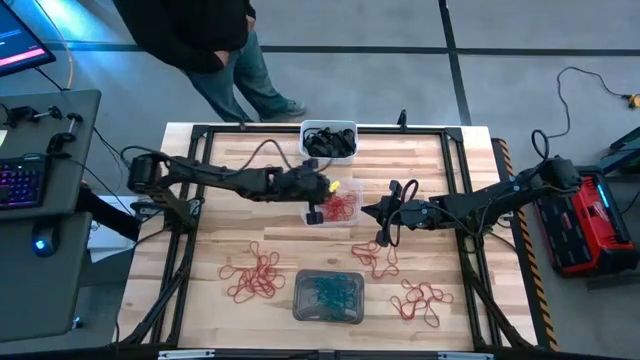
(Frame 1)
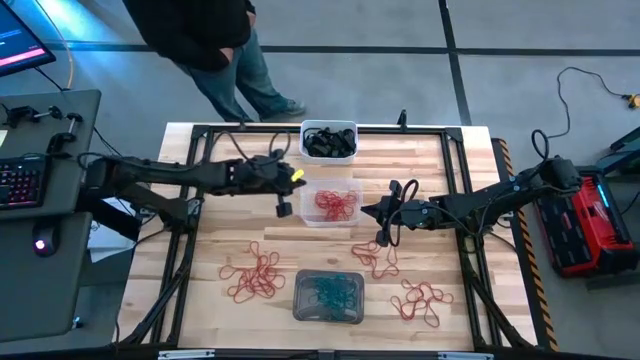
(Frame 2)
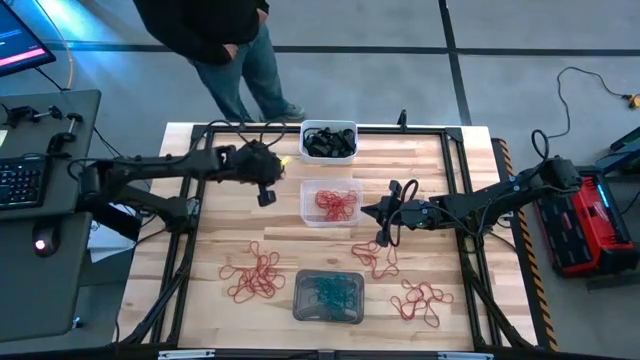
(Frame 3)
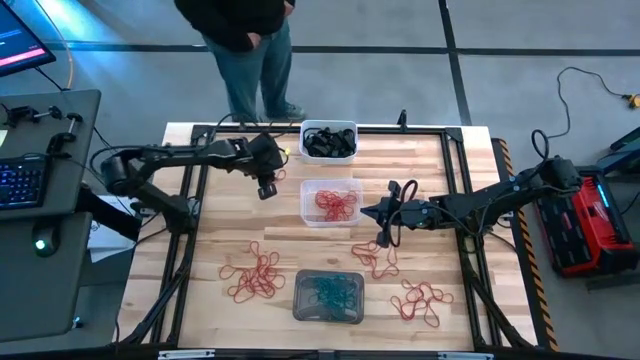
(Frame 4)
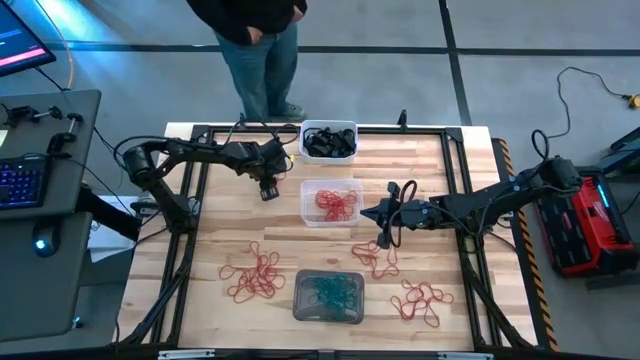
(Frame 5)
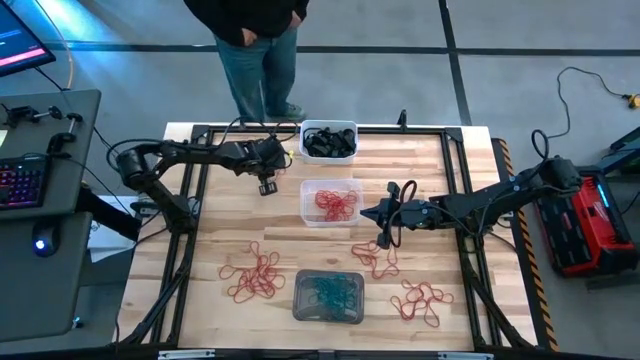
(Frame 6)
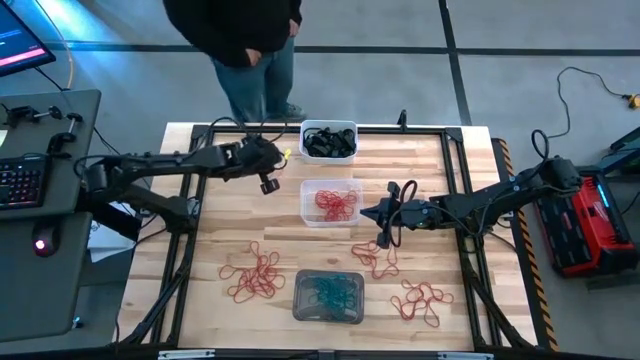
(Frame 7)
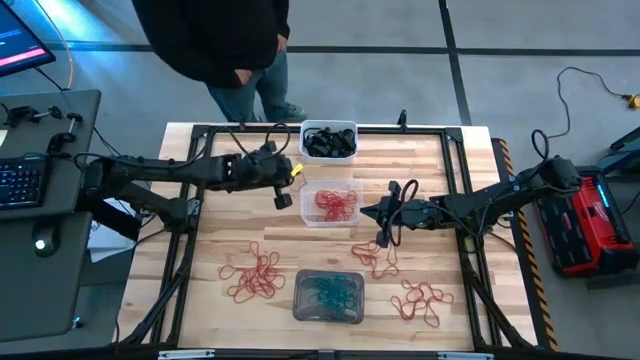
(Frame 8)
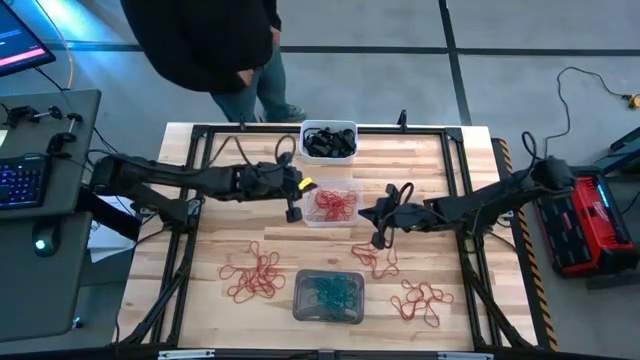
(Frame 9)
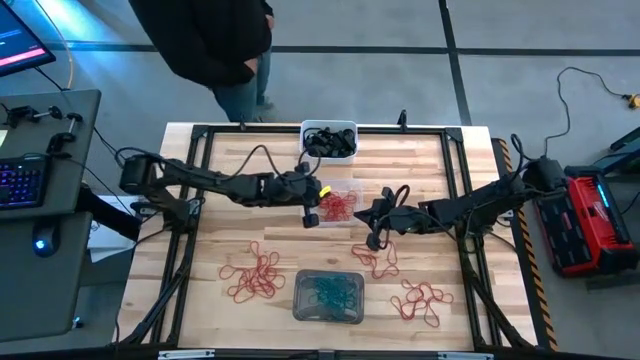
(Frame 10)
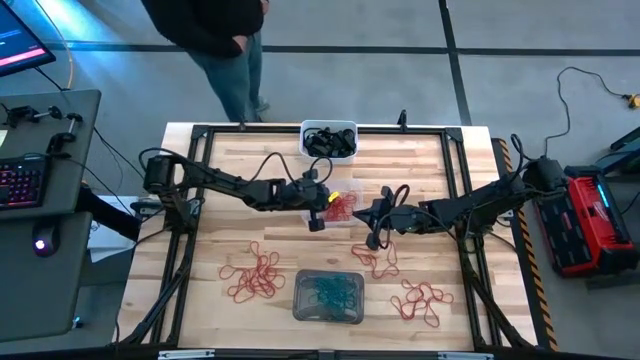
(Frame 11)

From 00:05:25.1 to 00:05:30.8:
Task: Sort rubber bands into baskets
Put the red rubber band into the transparent bin

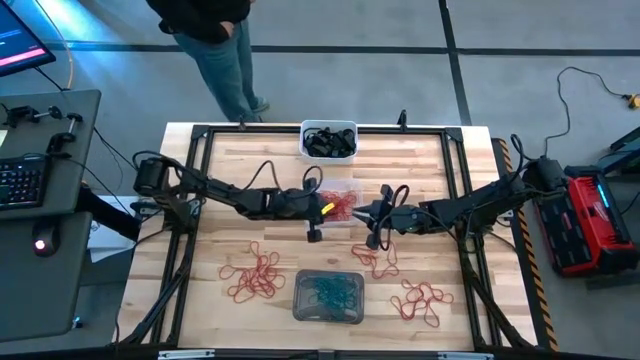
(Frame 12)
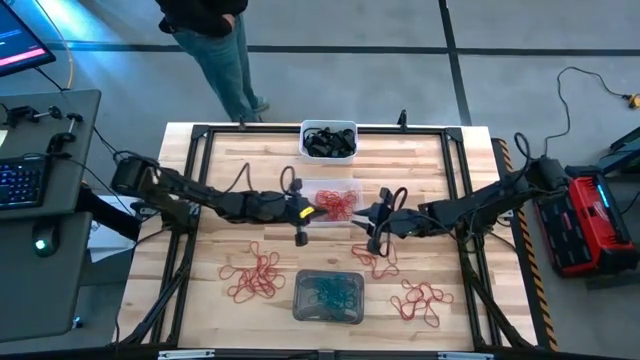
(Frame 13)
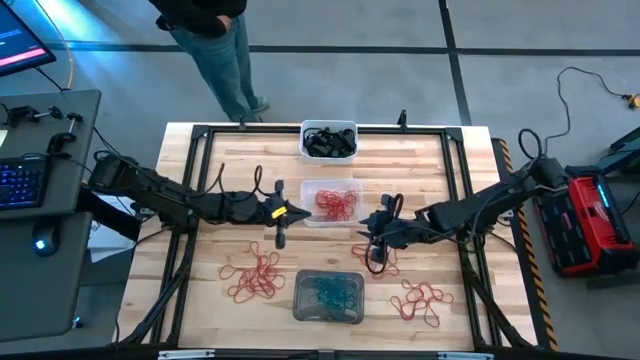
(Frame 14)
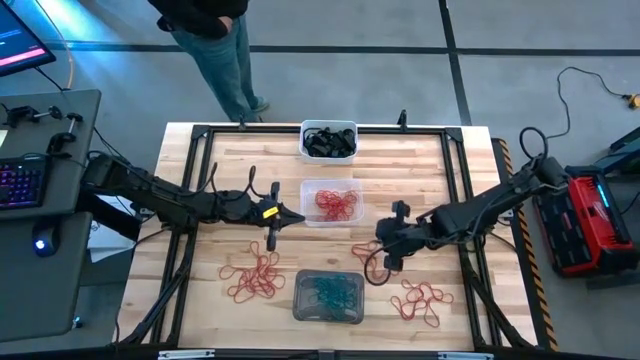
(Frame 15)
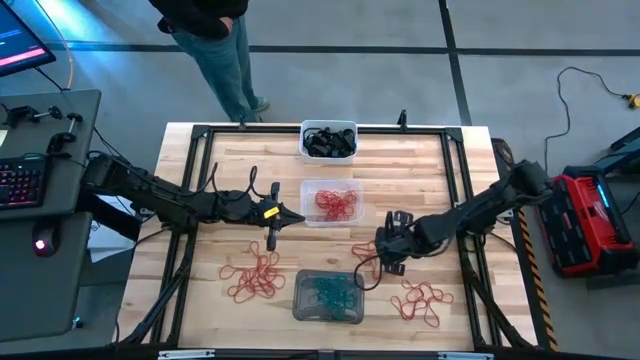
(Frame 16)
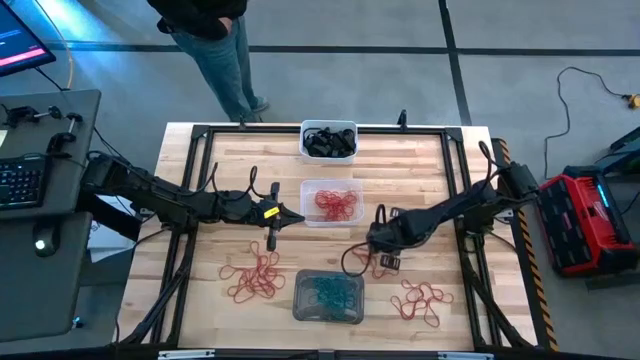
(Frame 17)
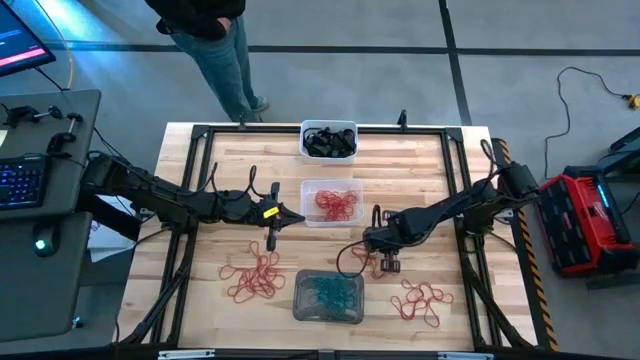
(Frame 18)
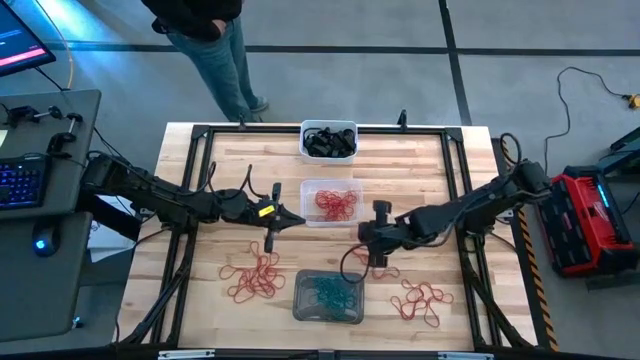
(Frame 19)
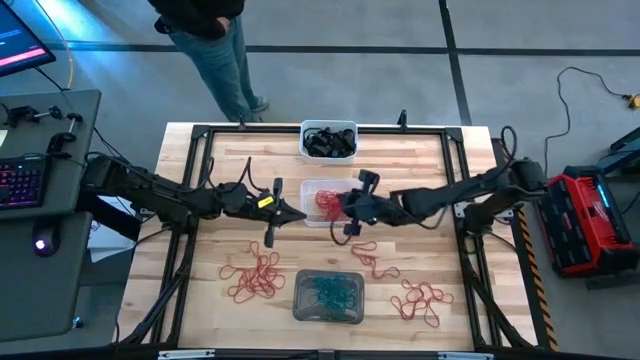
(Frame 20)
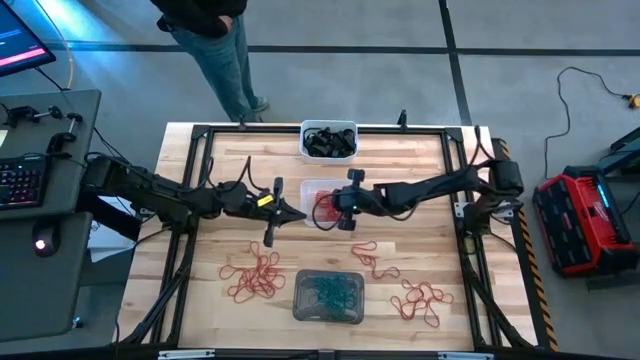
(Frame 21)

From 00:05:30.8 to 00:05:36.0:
Put the red rubber band into the transparent bin

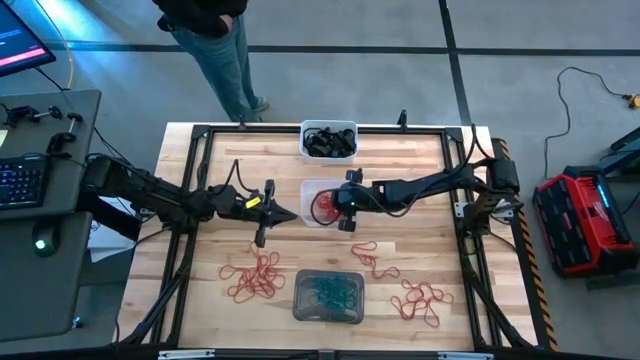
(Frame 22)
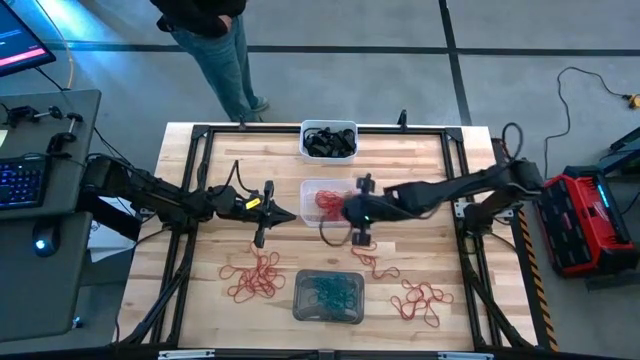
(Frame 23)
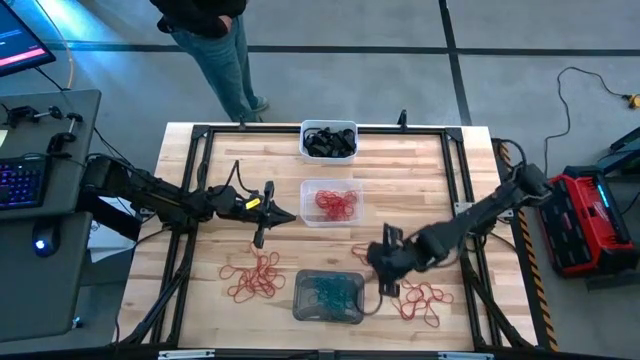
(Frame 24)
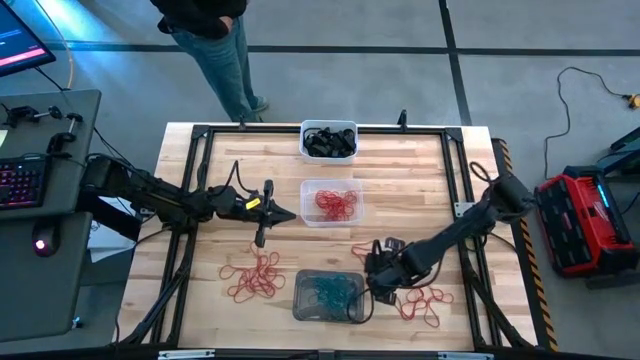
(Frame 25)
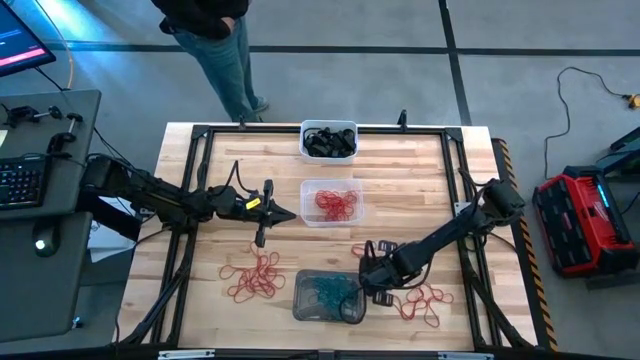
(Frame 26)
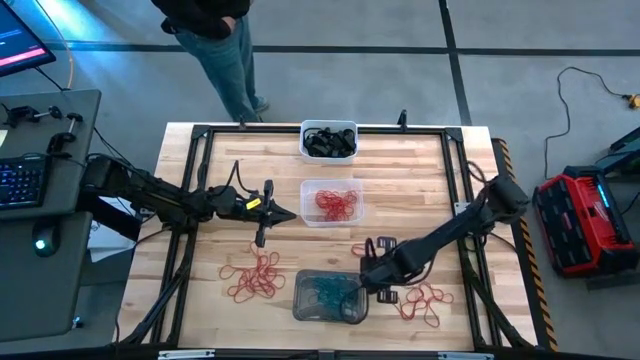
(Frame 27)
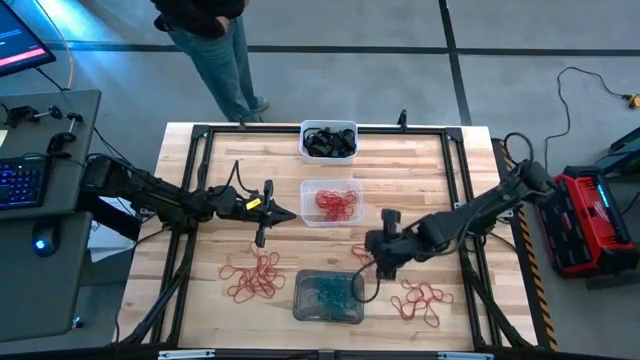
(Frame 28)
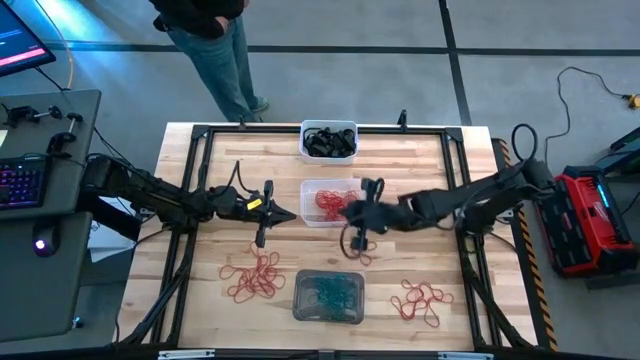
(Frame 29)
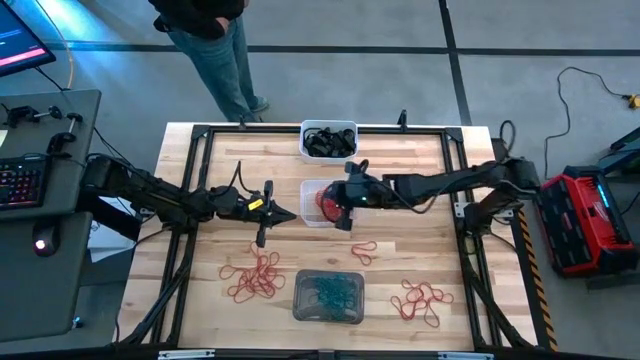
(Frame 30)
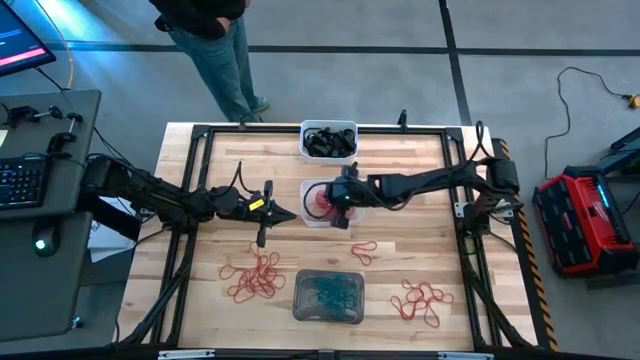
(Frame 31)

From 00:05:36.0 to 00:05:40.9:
Put the red rubber band into the transparent bin

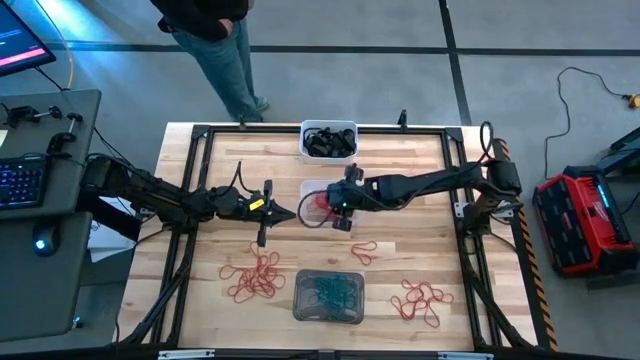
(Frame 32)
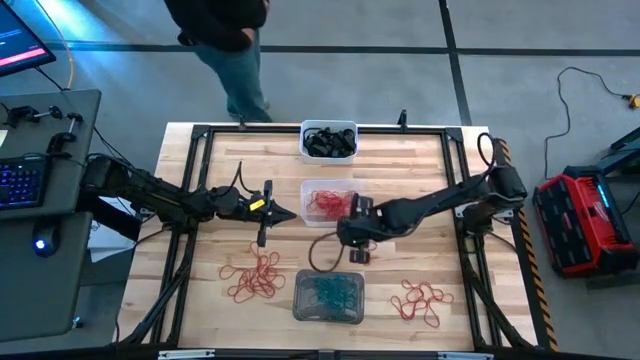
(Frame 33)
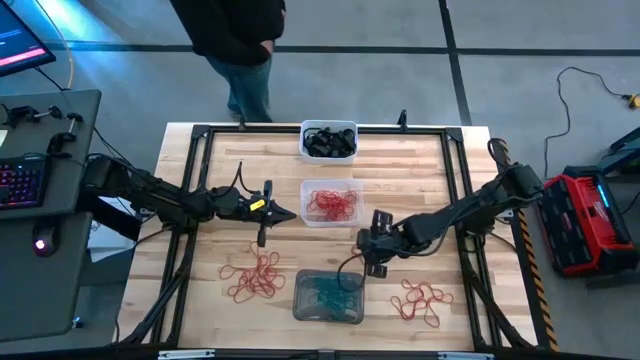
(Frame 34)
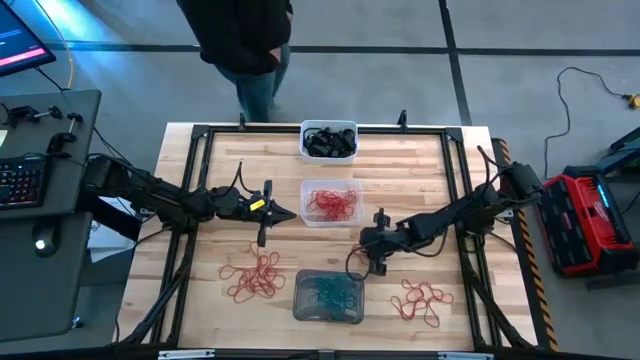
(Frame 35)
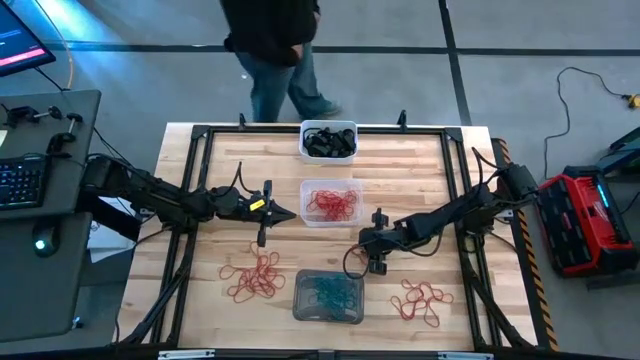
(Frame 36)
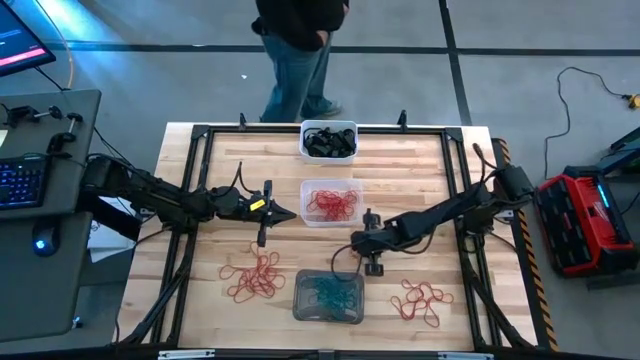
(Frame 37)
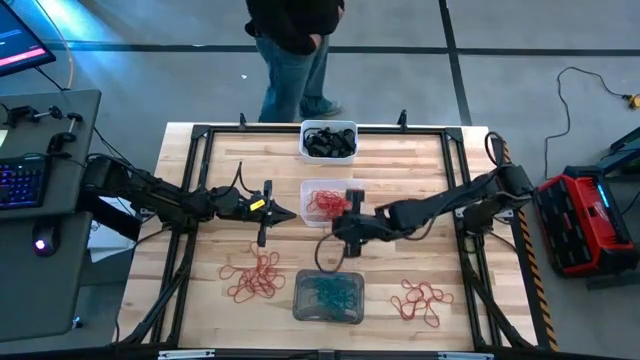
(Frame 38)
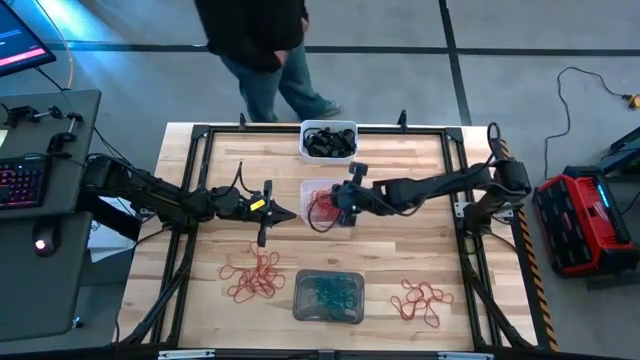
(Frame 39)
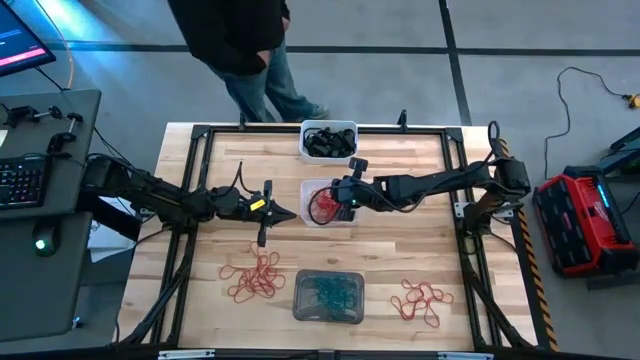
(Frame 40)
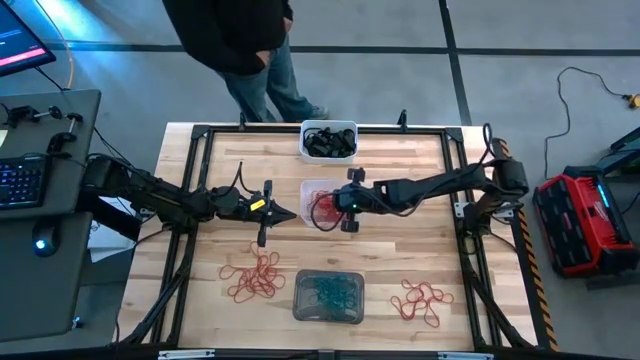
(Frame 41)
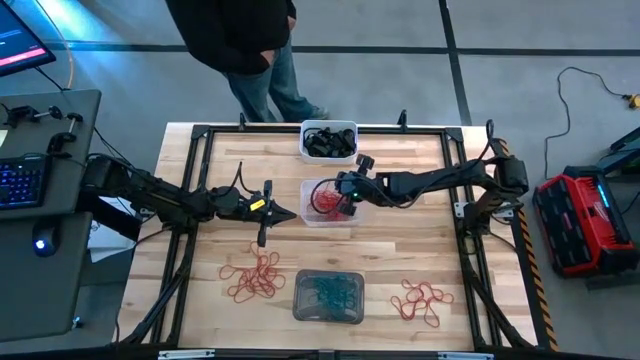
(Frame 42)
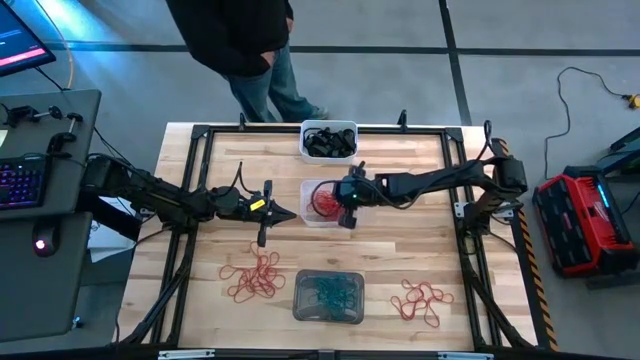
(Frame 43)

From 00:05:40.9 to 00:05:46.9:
Put the red rubber band into the transparent bin
